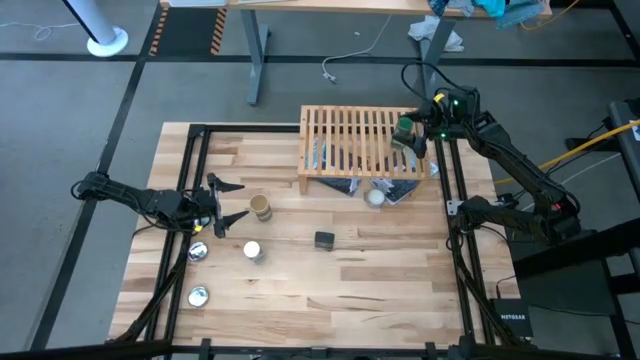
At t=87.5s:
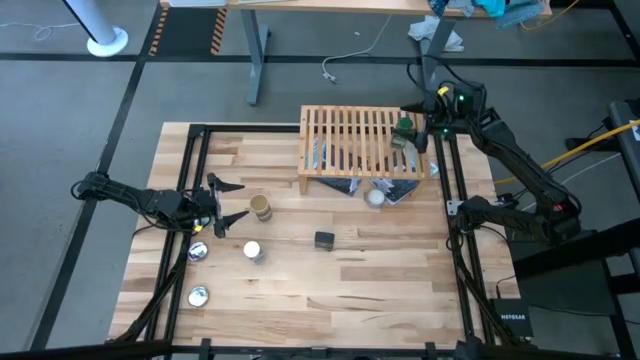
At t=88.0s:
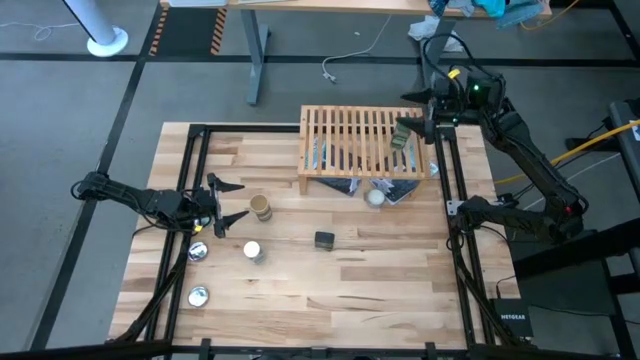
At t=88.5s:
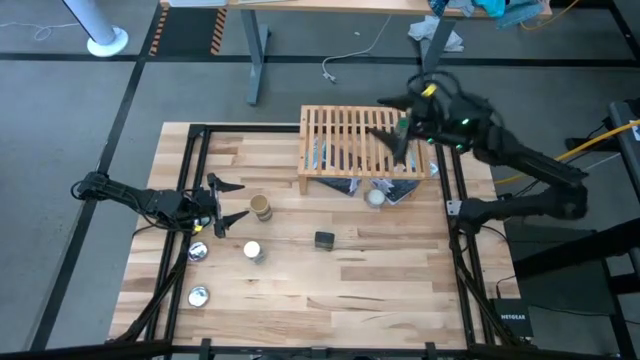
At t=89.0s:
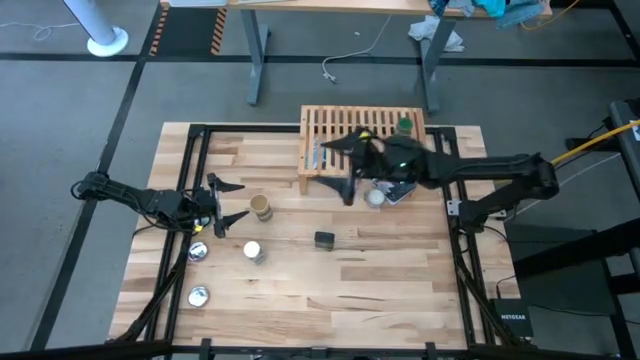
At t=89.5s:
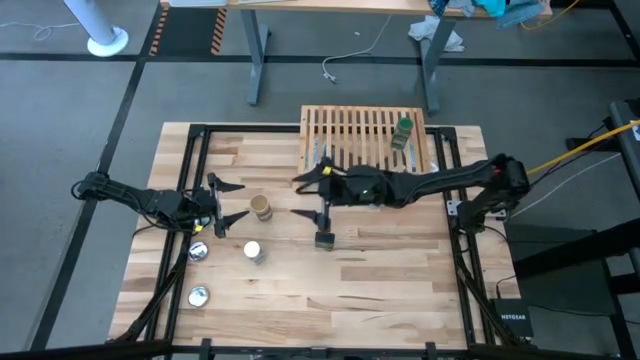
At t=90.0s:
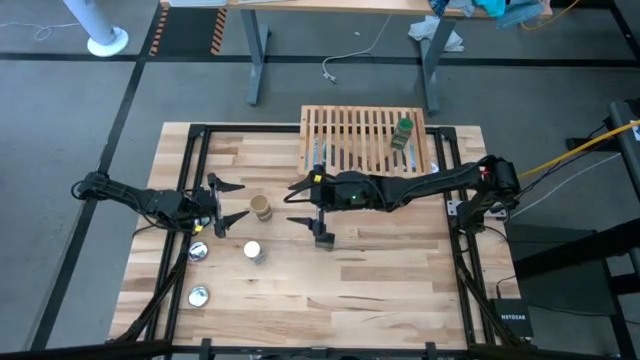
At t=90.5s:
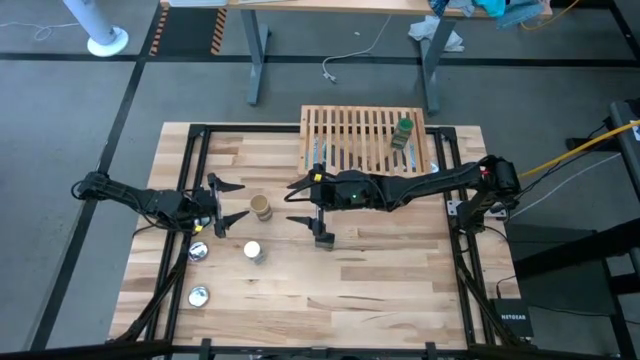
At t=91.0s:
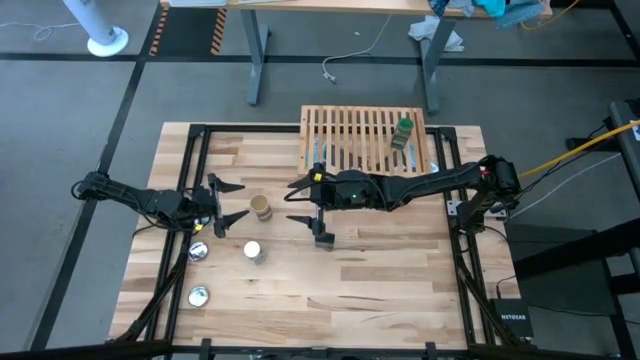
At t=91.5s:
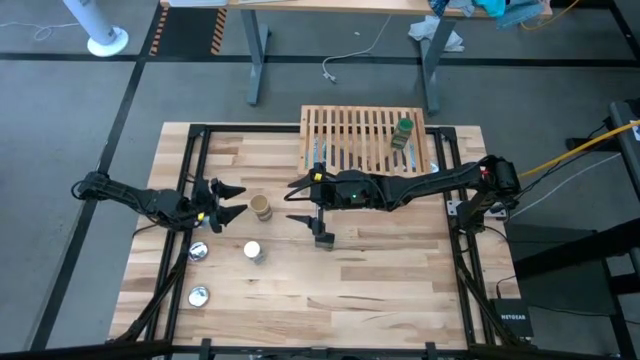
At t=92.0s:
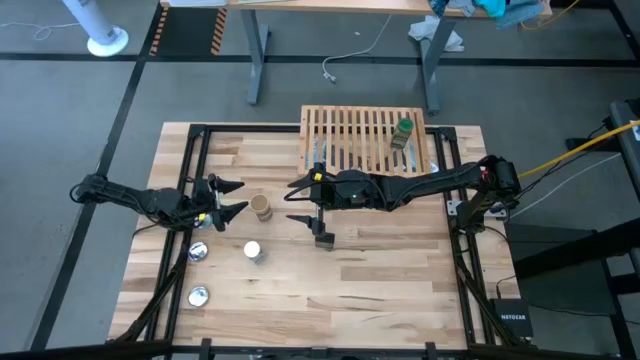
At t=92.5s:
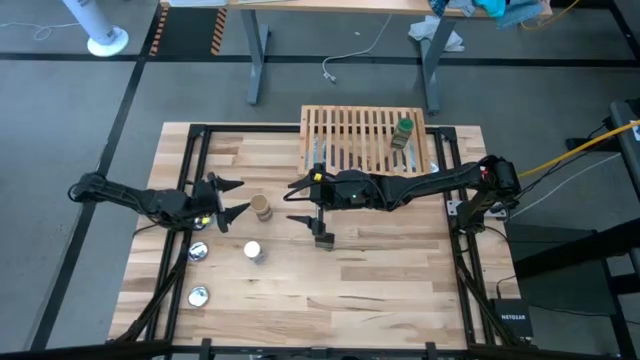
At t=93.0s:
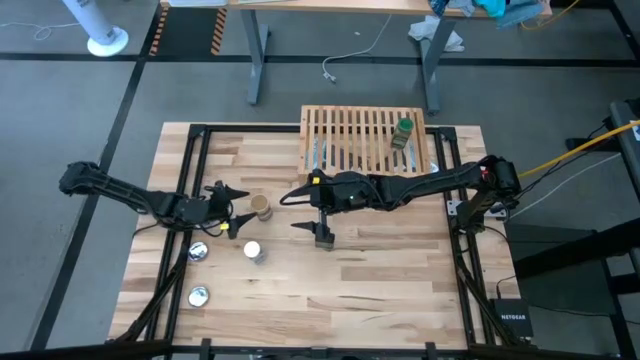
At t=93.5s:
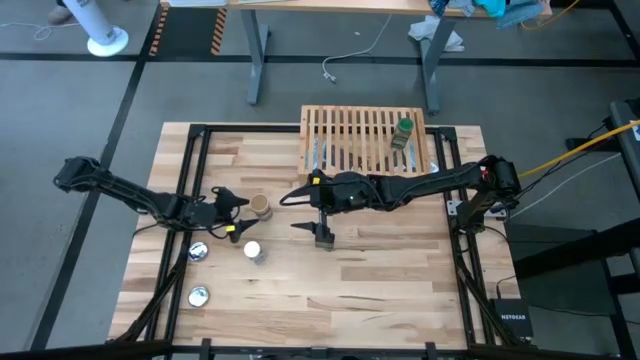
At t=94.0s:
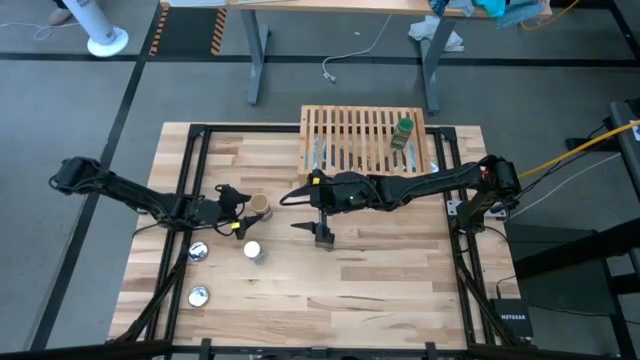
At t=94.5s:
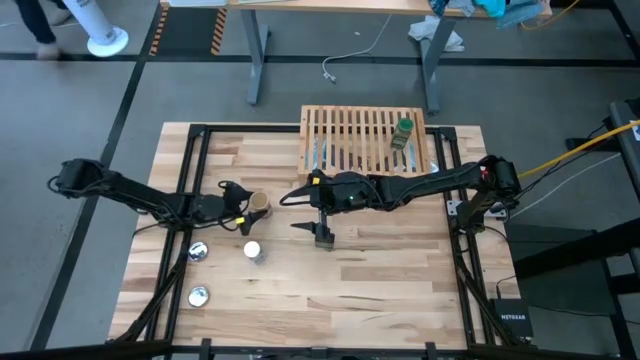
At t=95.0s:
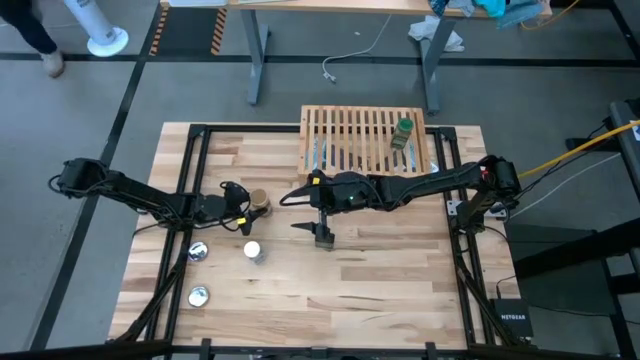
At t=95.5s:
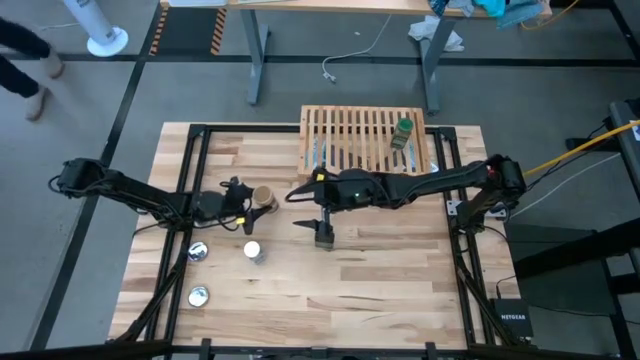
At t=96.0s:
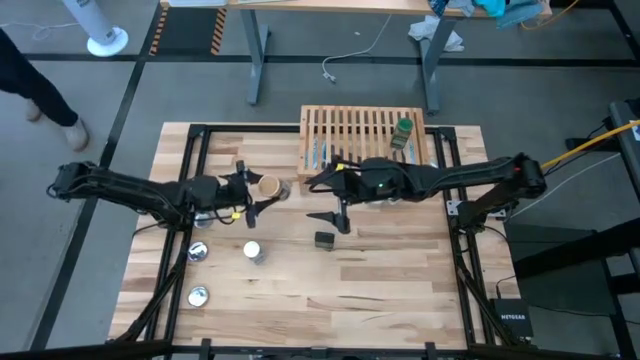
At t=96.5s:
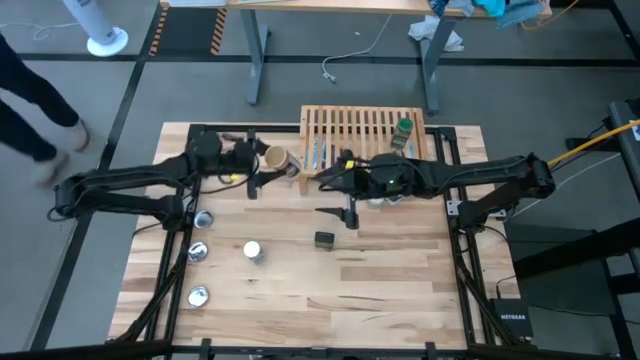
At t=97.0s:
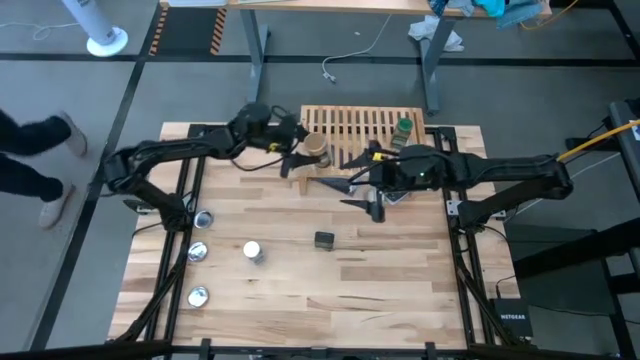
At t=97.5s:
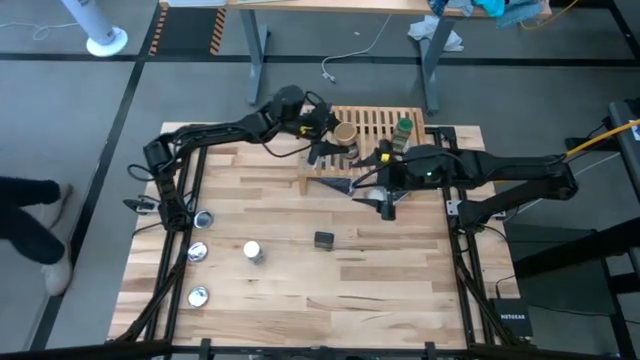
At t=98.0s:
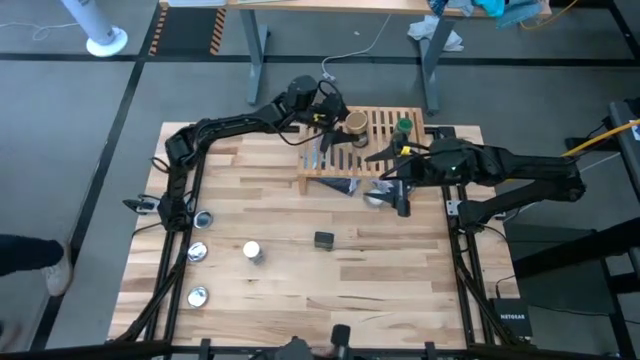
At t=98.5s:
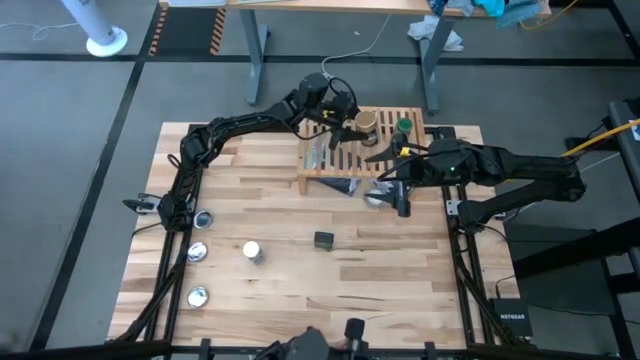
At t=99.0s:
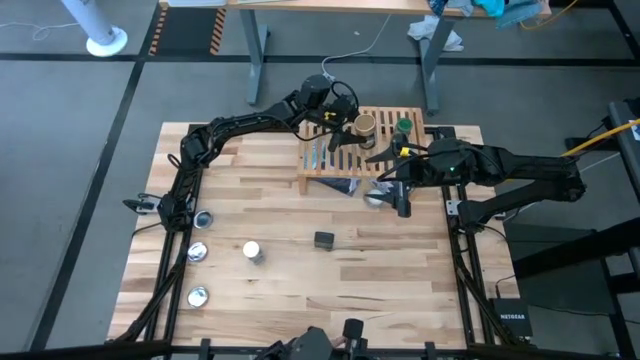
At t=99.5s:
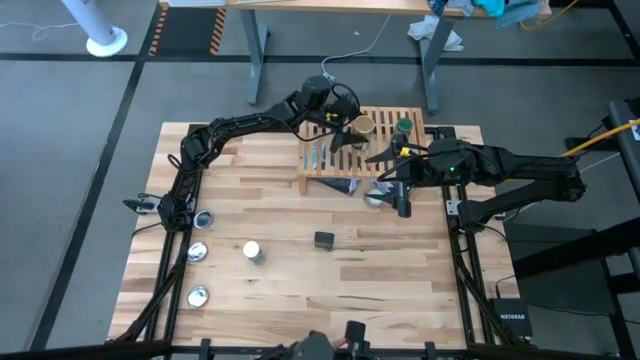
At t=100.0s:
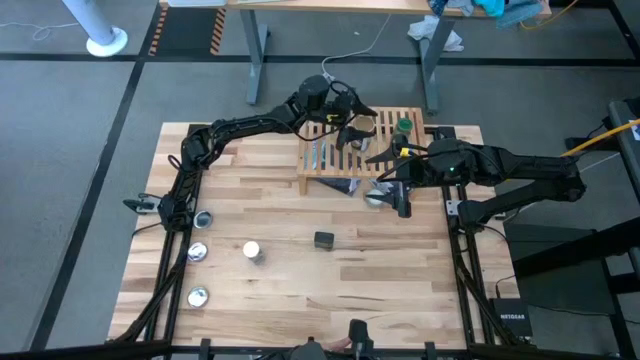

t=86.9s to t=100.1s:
Task: Shelf spices
Put the gold seasoning bottle on the shelf

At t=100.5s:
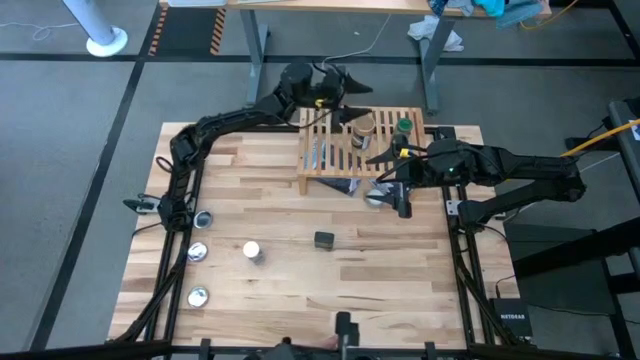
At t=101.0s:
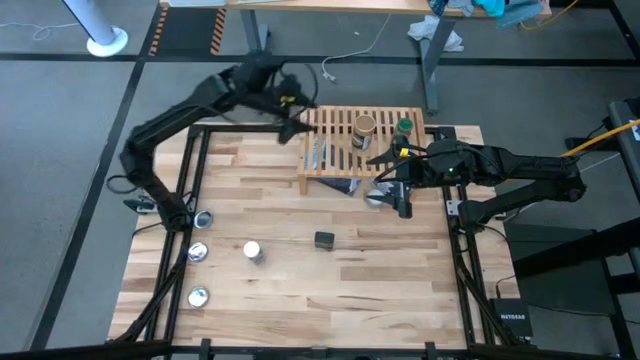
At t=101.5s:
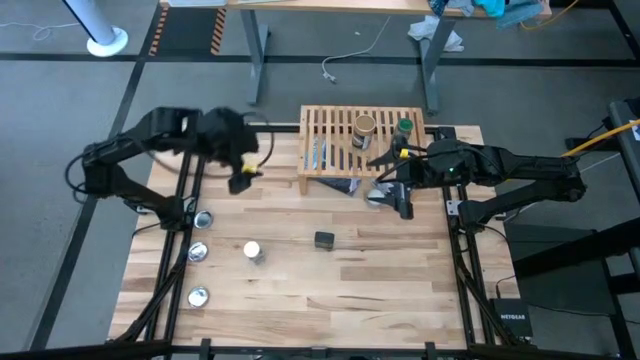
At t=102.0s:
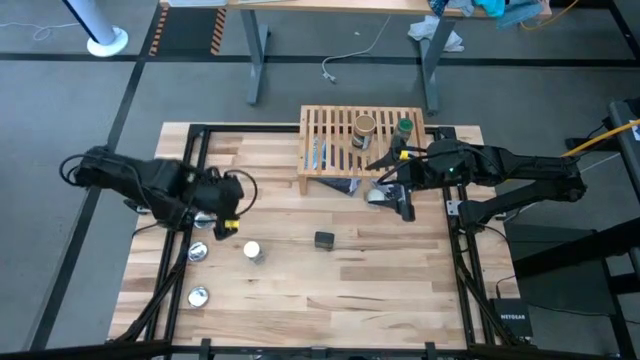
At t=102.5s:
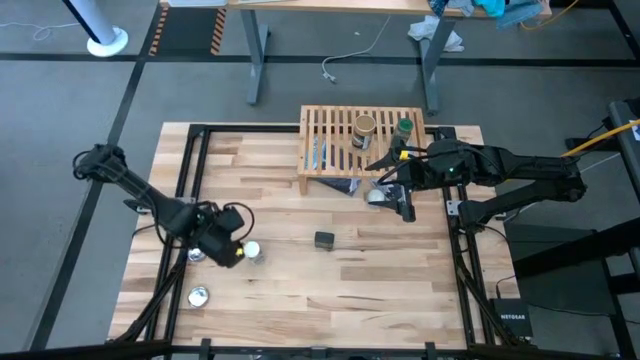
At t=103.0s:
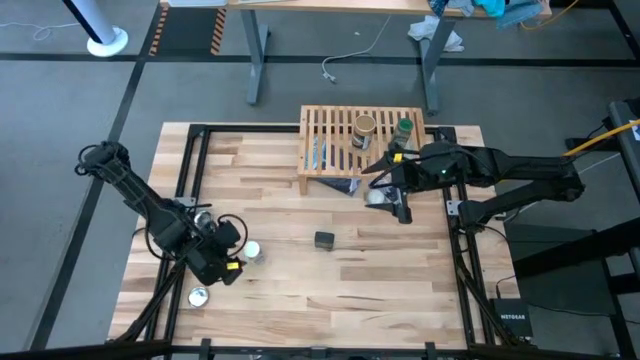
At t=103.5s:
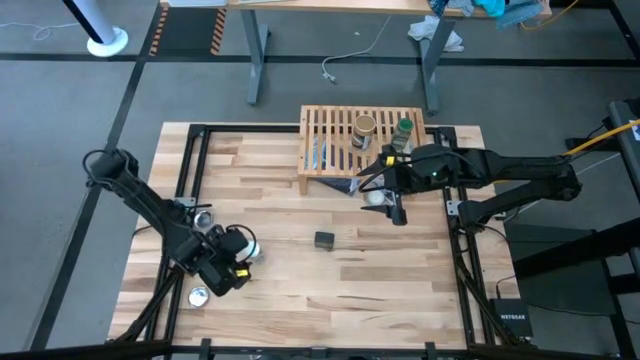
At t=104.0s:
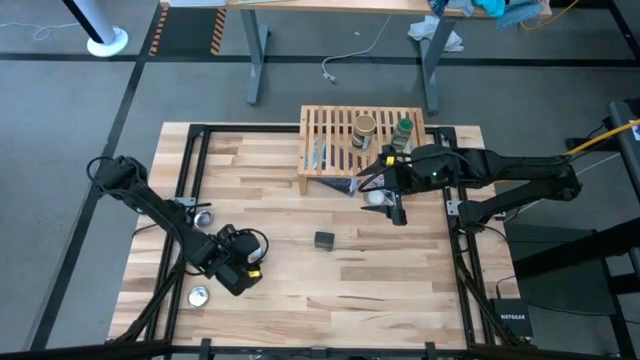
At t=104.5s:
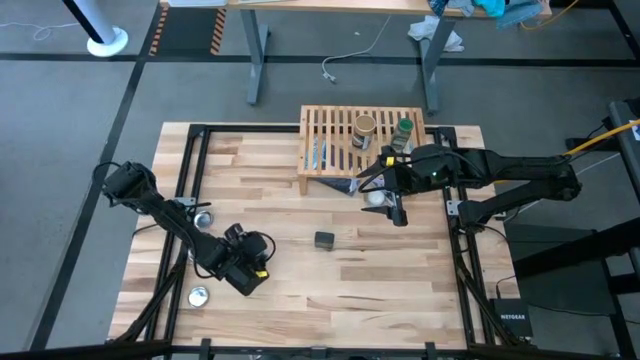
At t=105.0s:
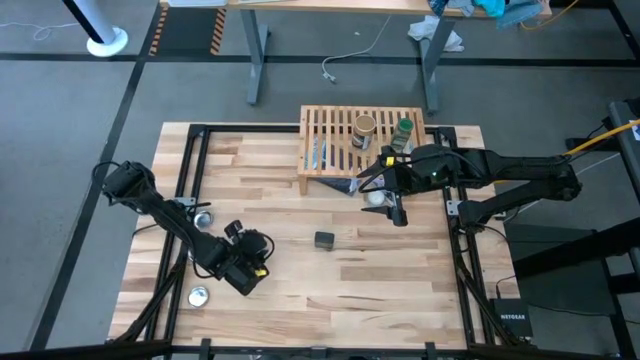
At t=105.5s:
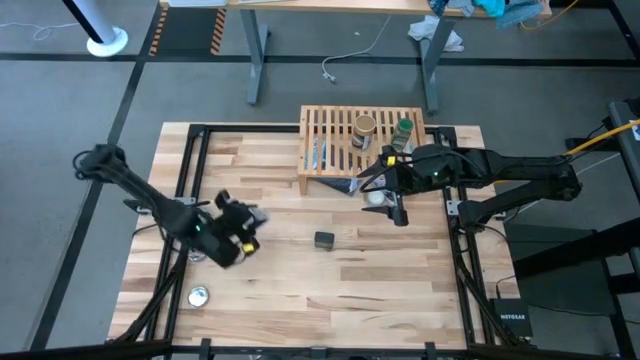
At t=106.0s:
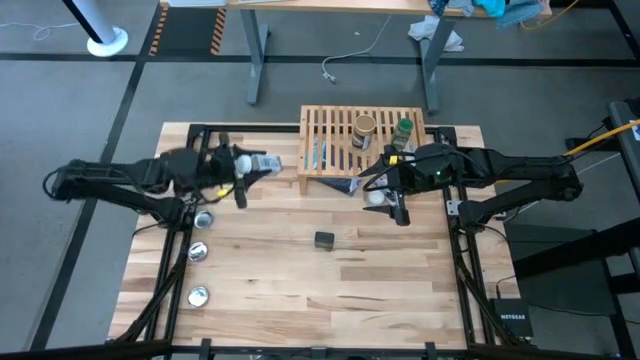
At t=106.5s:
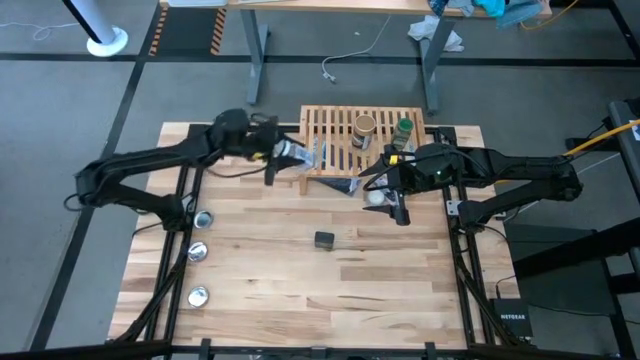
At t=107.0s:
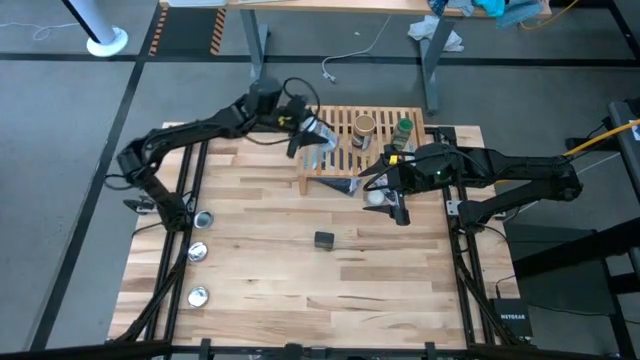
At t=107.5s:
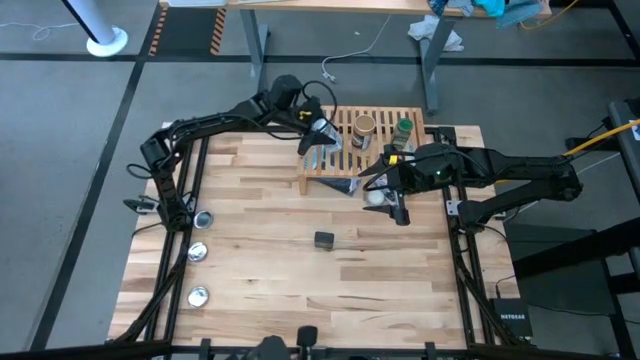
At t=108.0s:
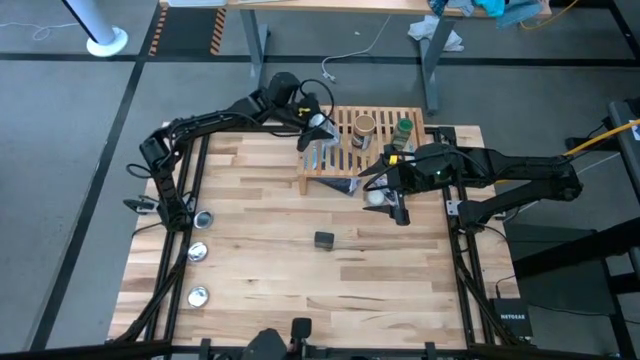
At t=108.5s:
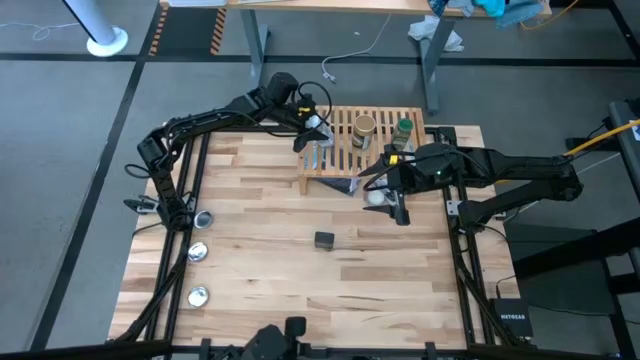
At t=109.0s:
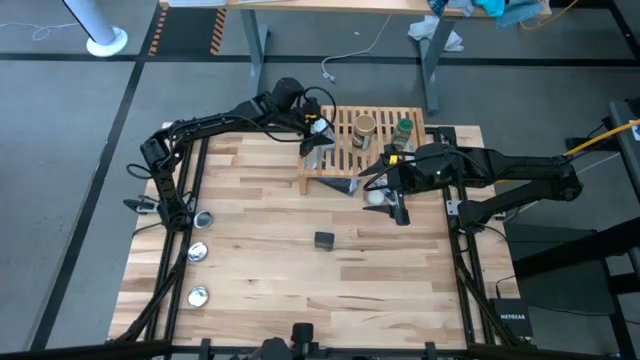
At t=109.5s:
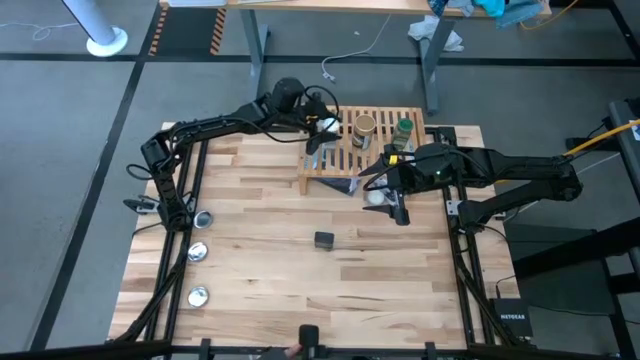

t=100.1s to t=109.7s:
Put the white seasoning bottle on the shelf
